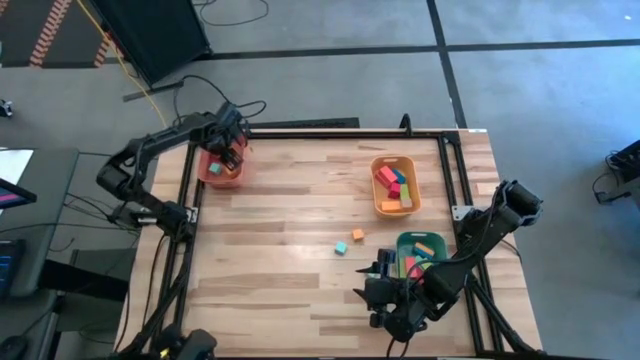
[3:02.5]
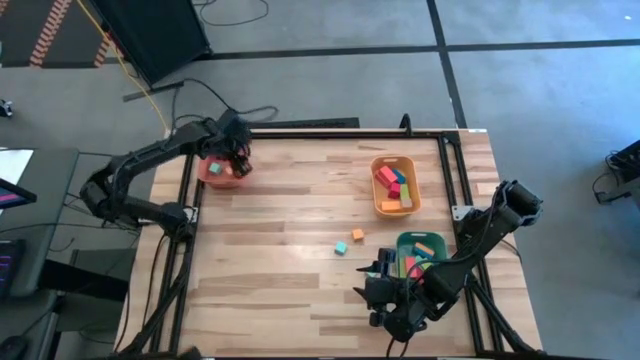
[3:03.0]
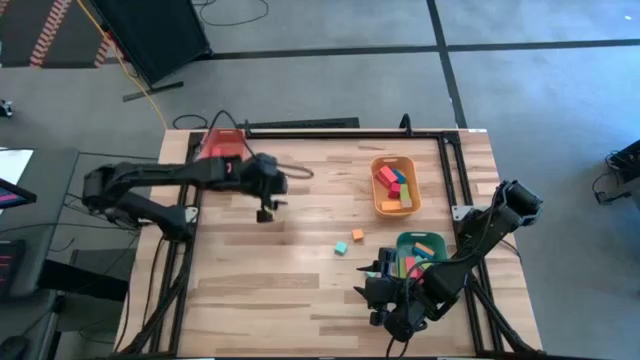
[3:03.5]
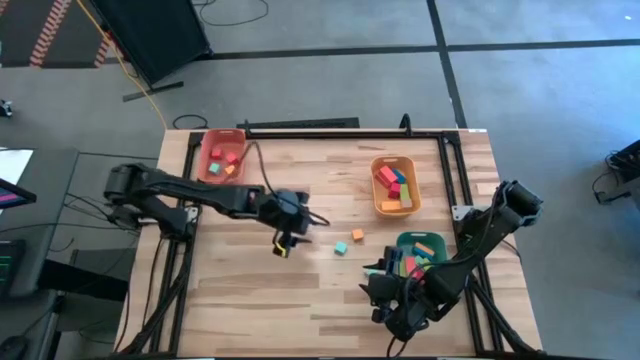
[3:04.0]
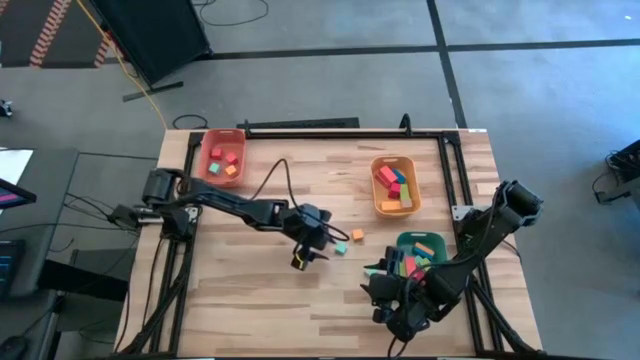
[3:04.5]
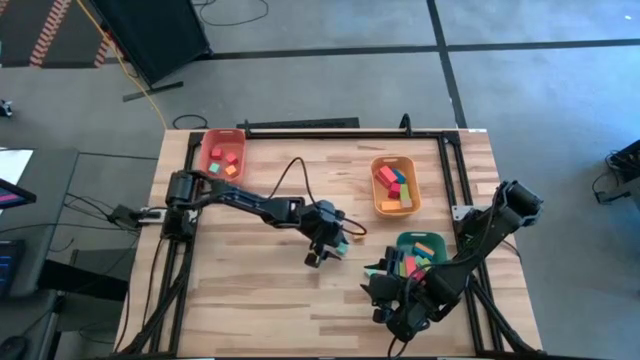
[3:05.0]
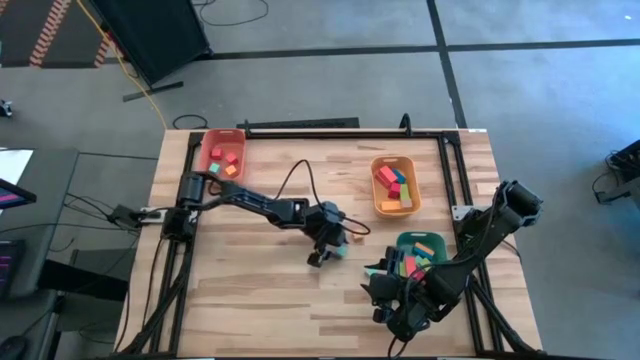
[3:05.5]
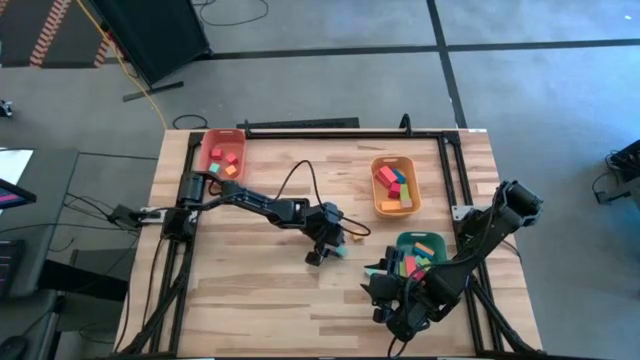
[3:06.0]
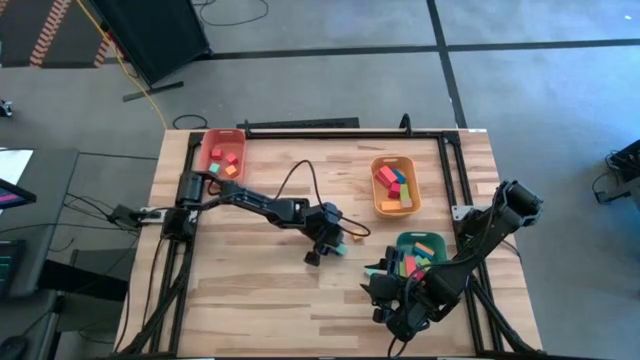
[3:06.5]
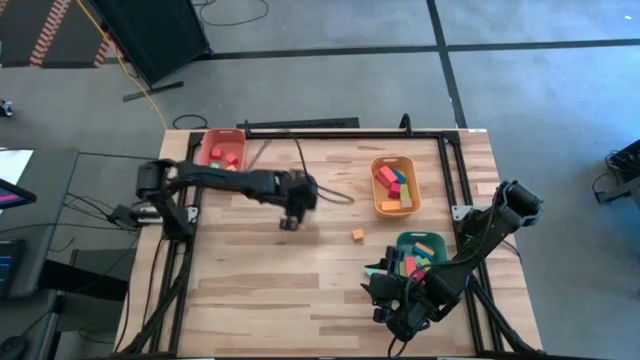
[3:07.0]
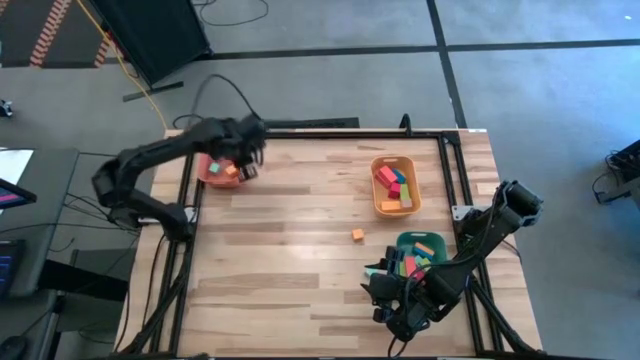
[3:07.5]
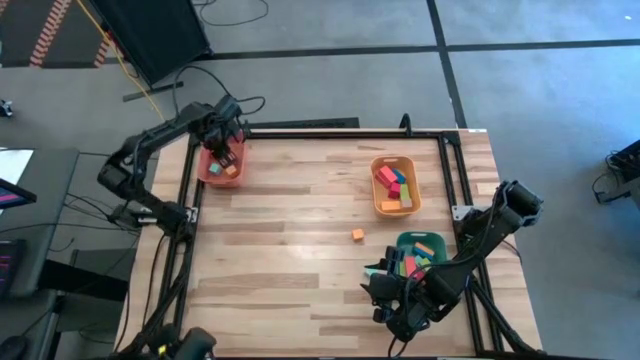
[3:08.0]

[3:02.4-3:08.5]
Task: Sort blocks by size
Put the top square blue block into the orange bin

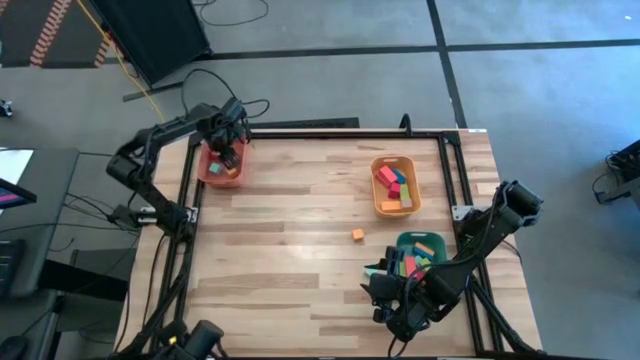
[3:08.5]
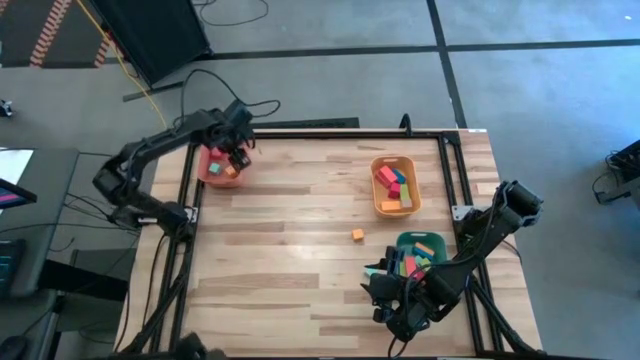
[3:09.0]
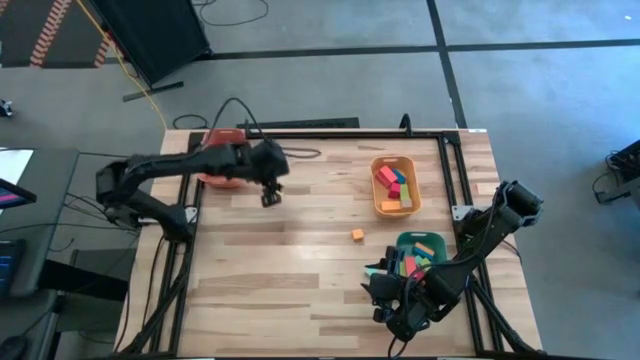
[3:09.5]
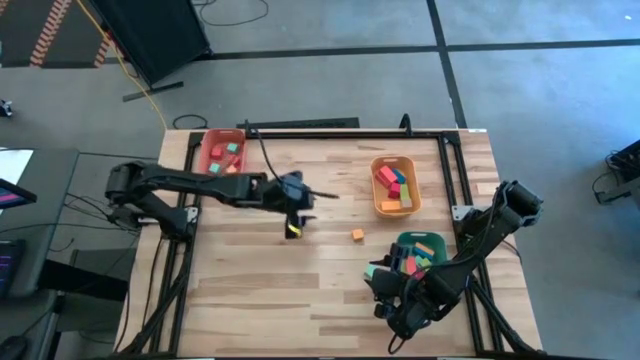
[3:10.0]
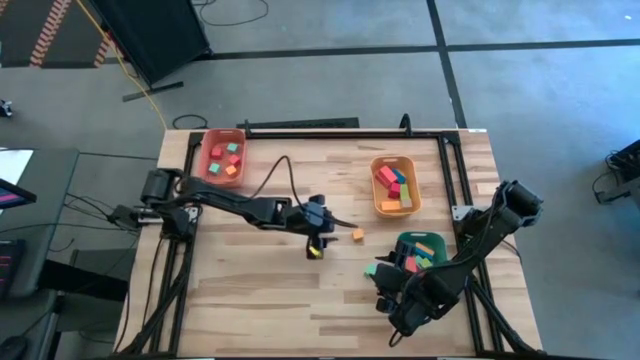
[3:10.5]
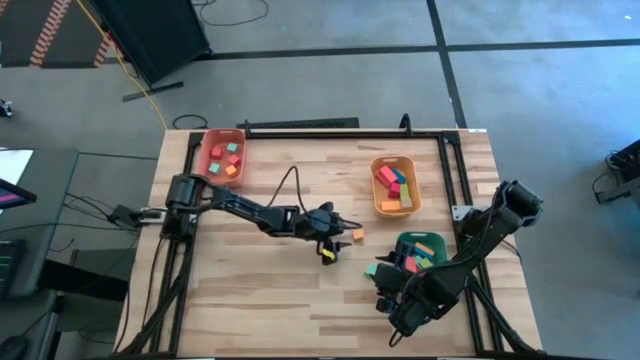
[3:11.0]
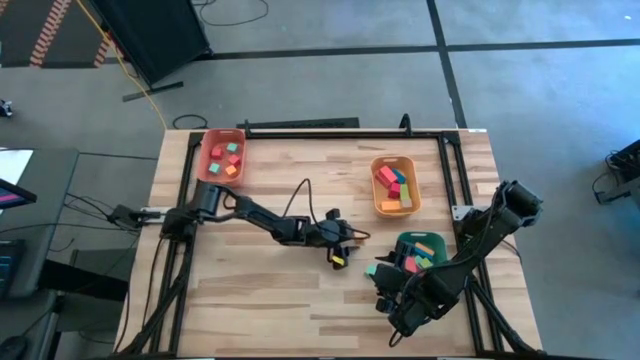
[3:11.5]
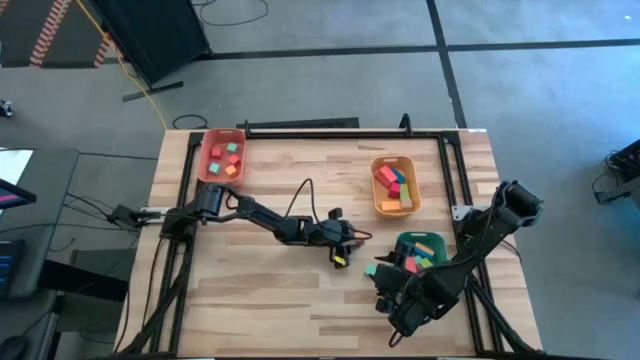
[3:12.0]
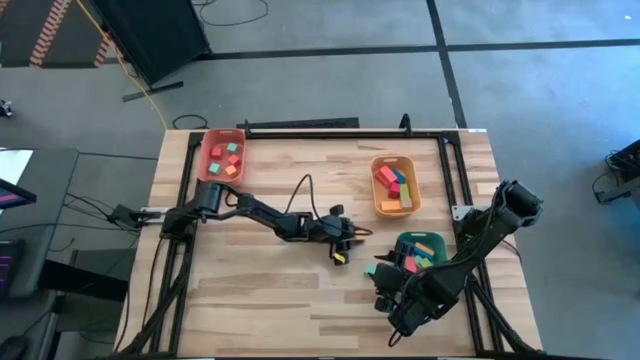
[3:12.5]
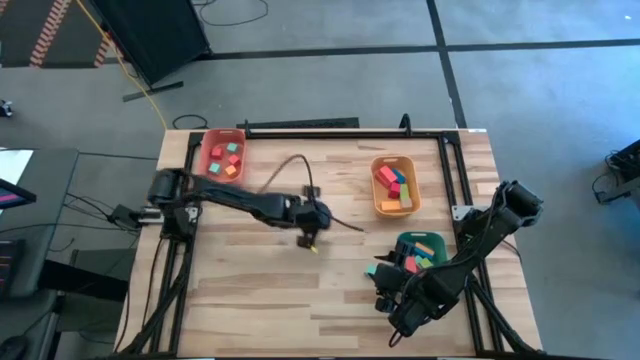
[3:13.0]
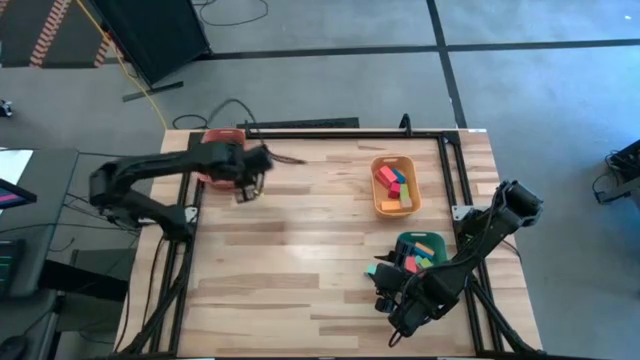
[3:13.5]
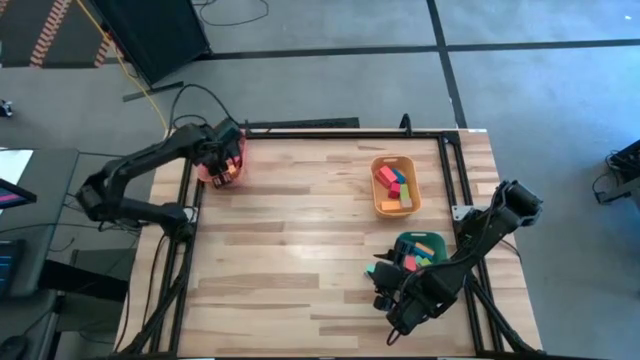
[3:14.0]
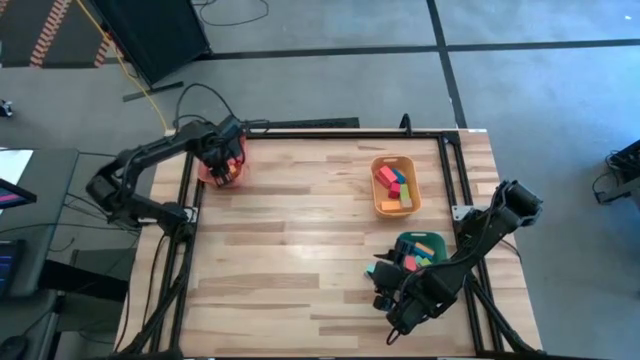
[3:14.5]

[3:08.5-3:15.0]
Put the square yellow block into the orange bin

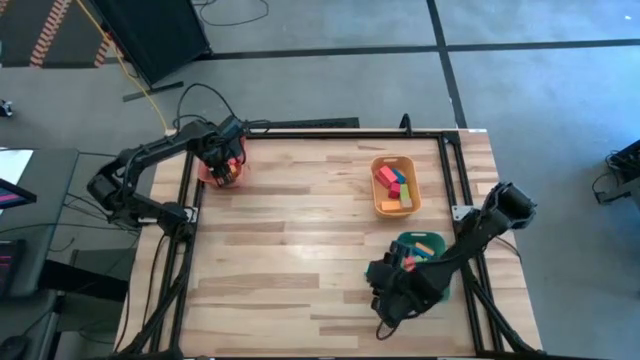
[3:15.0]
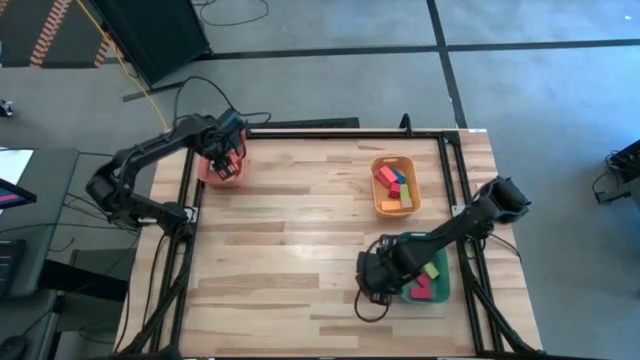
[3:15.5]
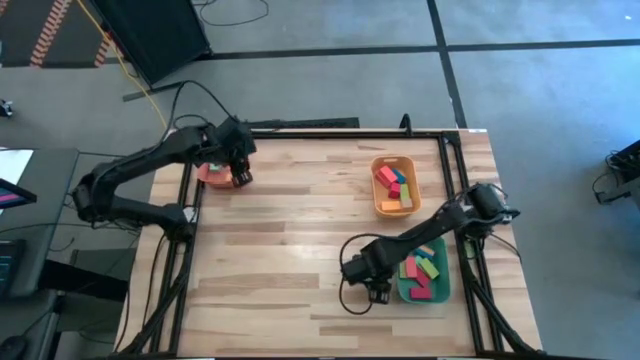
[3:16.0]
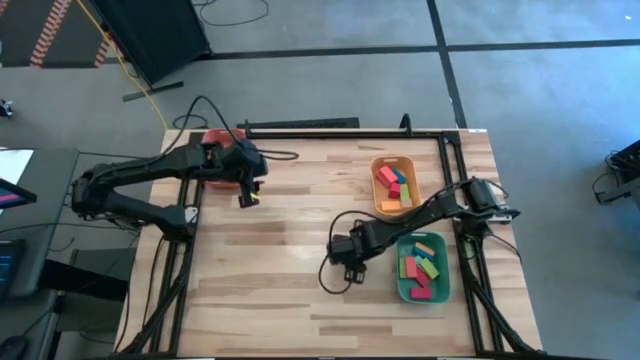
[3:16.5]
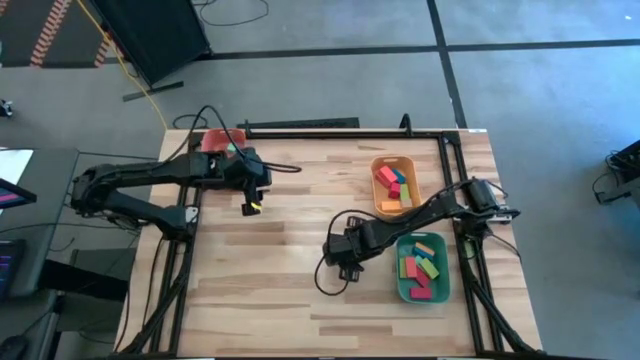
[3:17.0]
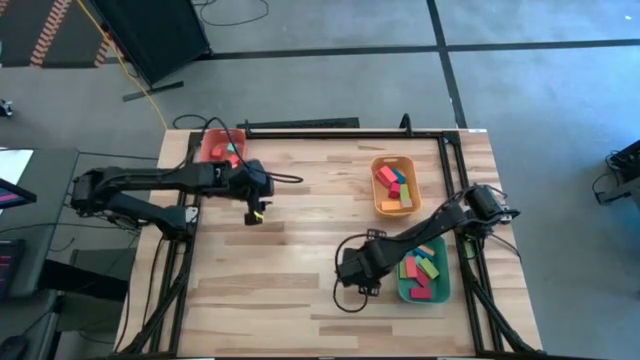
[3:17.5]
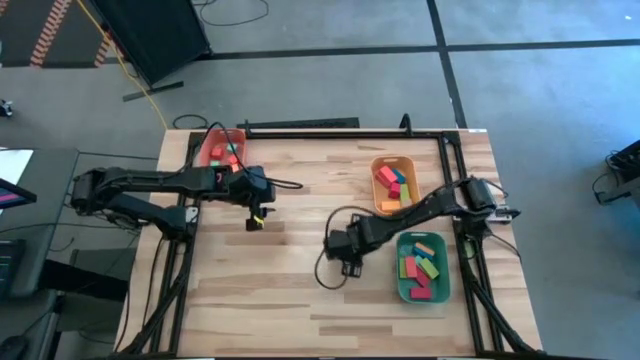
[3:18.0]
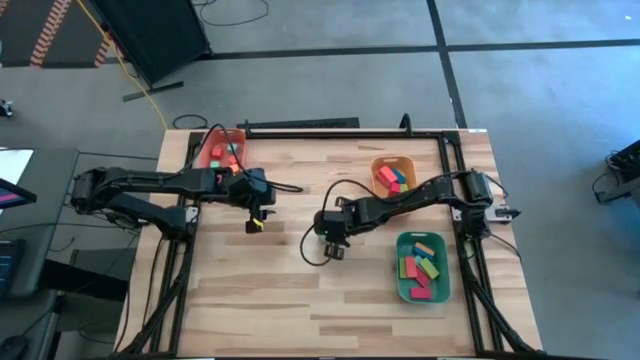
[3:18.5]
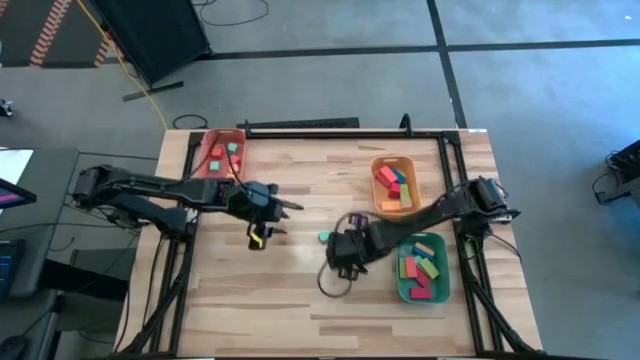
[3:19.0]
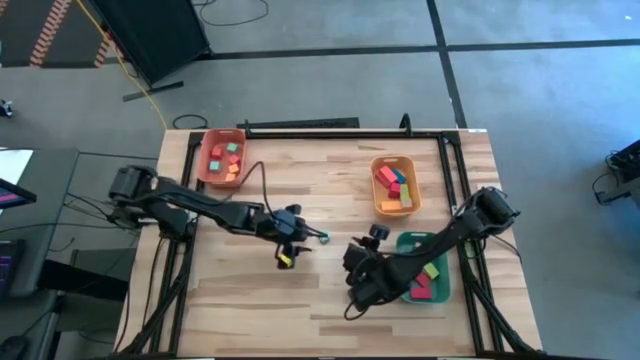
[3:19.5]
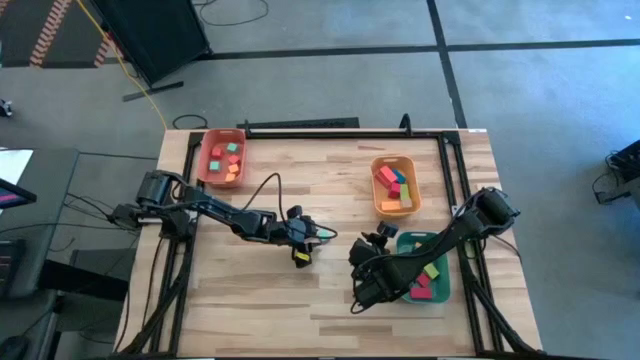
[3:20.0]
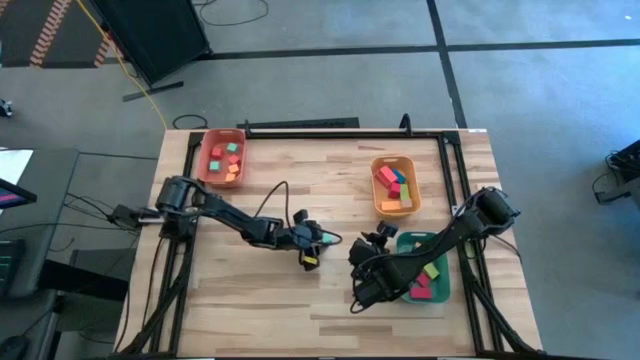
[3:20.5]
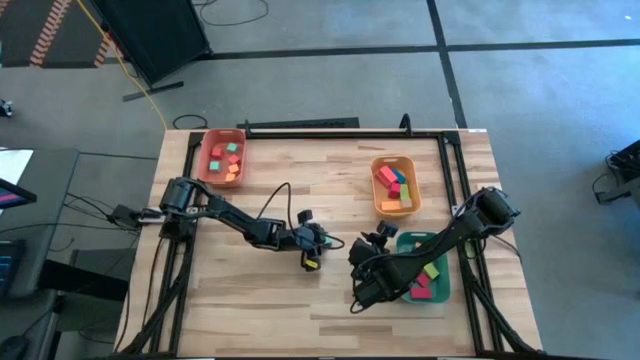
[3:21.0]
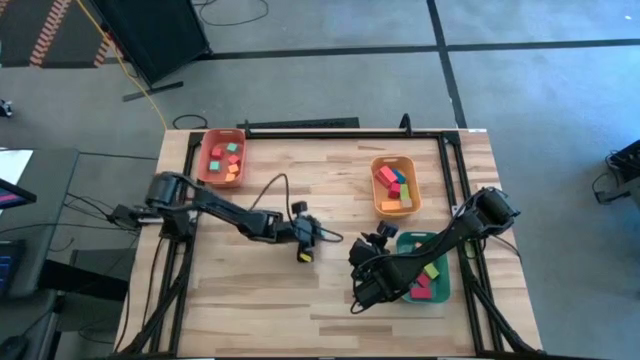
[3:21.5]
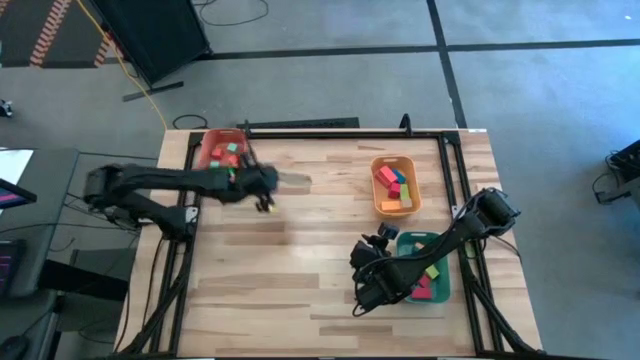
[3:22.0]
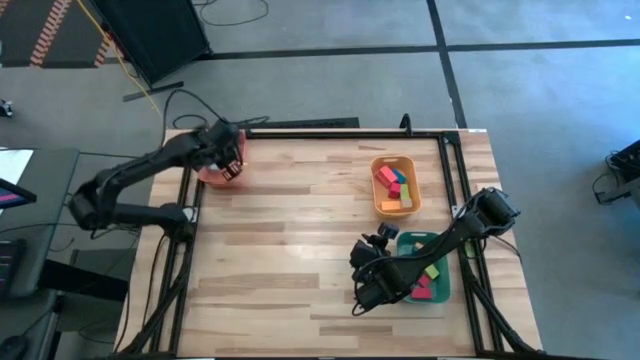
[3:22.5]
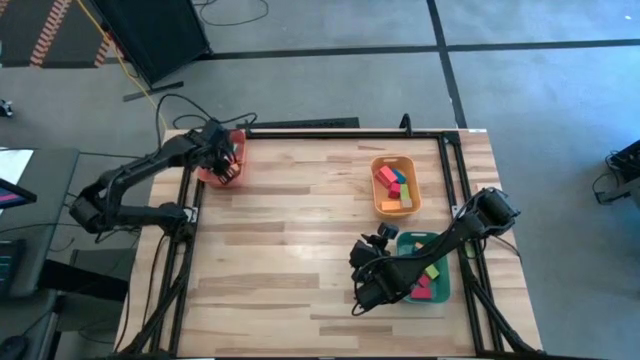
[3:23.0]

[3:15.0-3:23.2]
Put the square blue block into the orange bin
